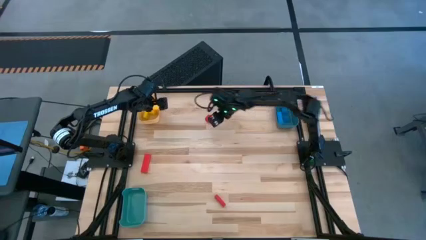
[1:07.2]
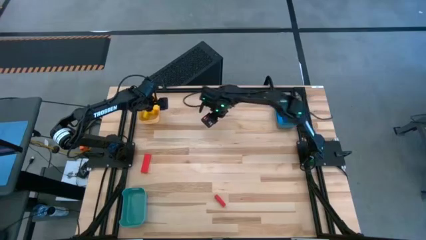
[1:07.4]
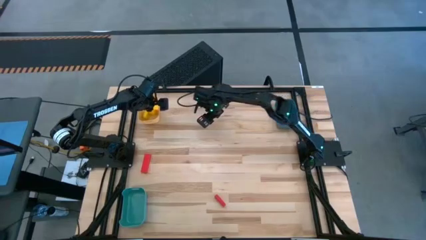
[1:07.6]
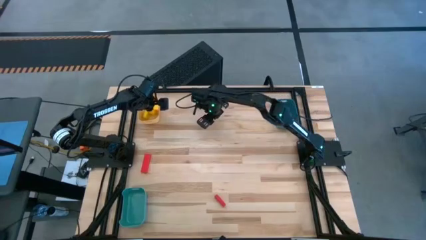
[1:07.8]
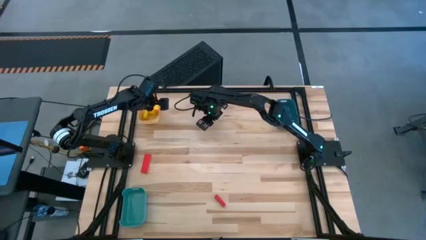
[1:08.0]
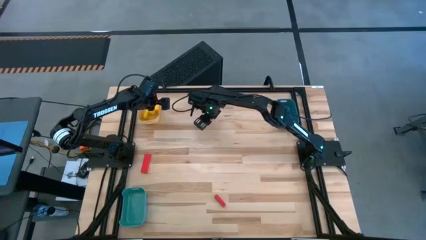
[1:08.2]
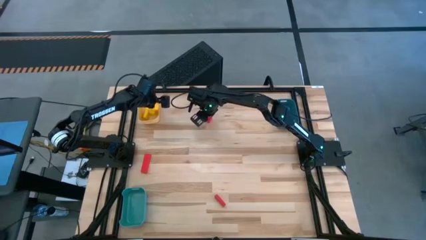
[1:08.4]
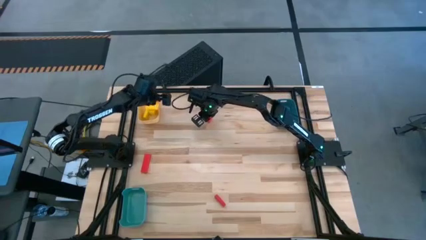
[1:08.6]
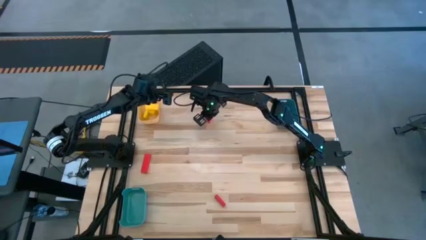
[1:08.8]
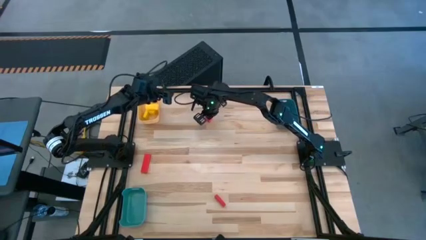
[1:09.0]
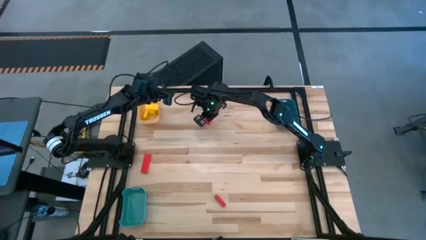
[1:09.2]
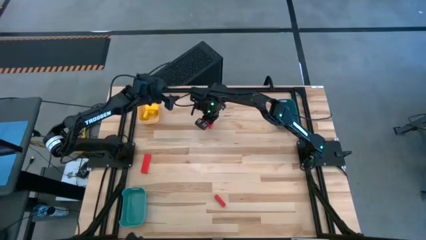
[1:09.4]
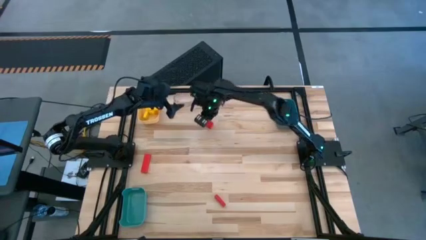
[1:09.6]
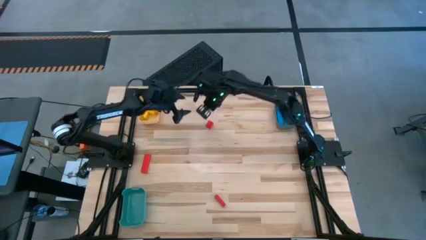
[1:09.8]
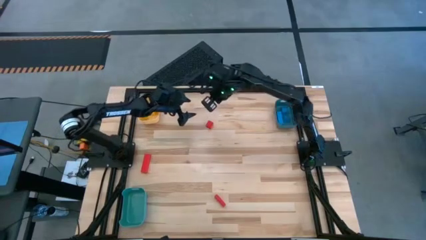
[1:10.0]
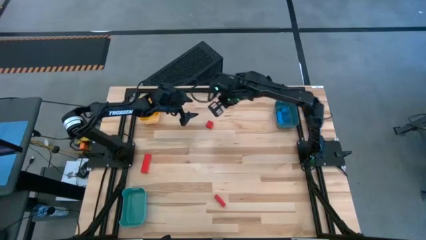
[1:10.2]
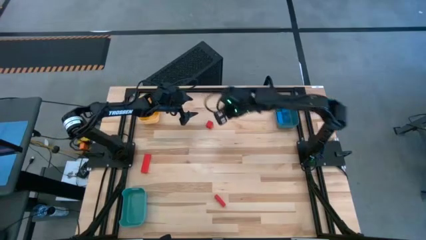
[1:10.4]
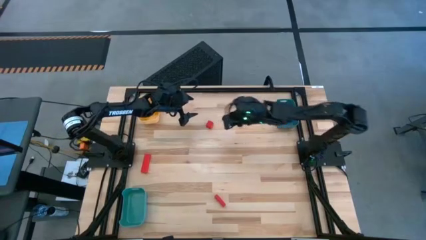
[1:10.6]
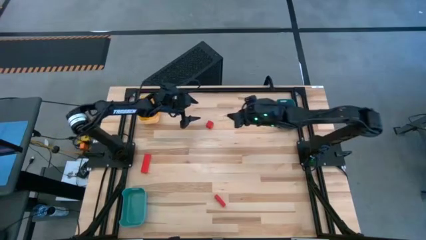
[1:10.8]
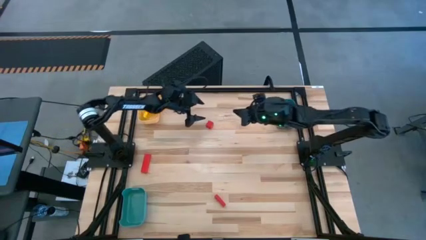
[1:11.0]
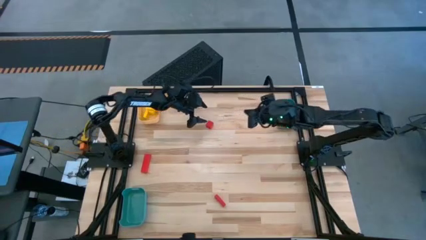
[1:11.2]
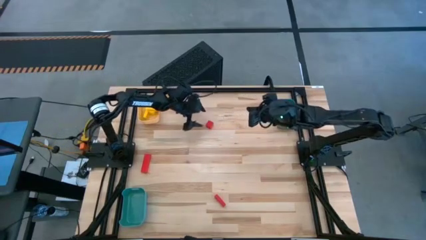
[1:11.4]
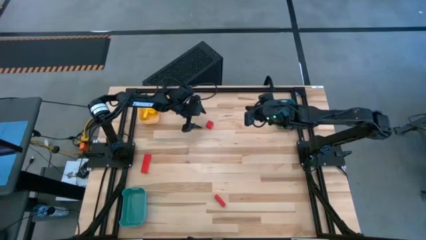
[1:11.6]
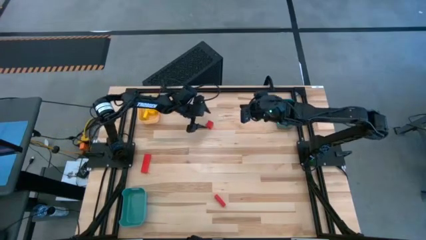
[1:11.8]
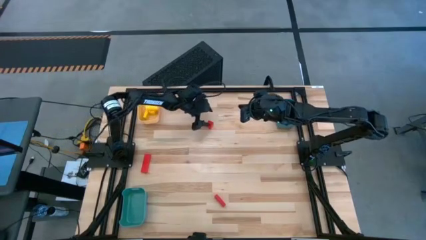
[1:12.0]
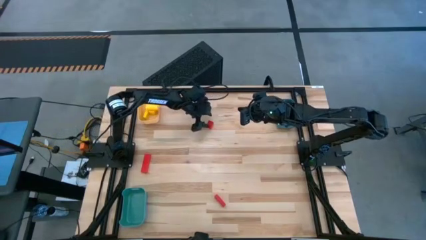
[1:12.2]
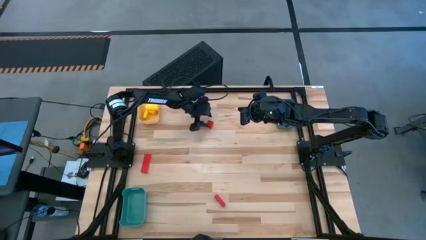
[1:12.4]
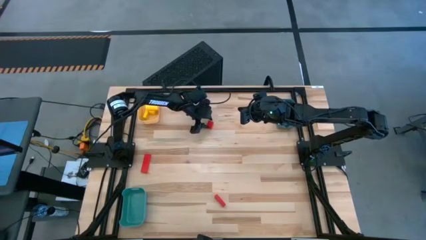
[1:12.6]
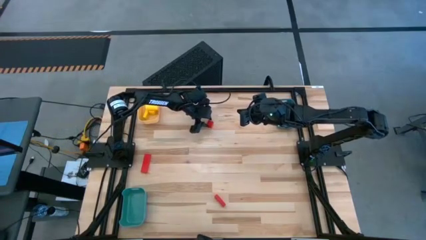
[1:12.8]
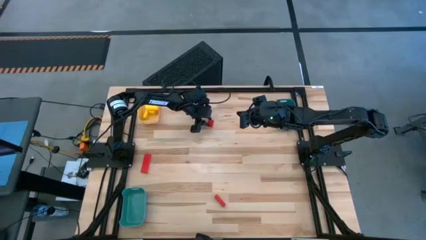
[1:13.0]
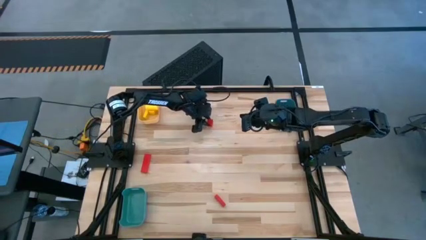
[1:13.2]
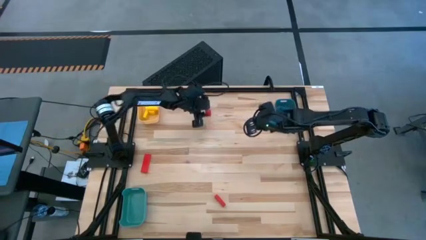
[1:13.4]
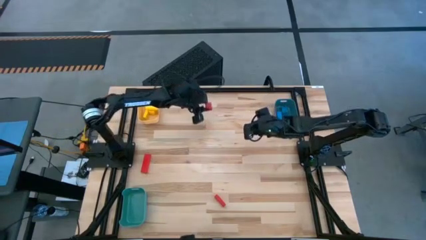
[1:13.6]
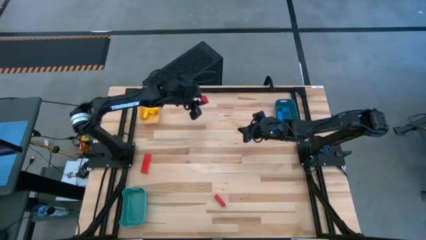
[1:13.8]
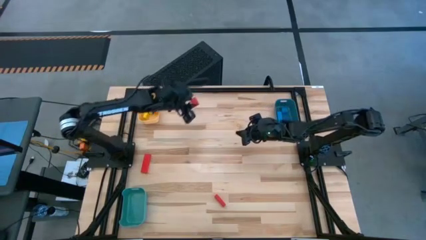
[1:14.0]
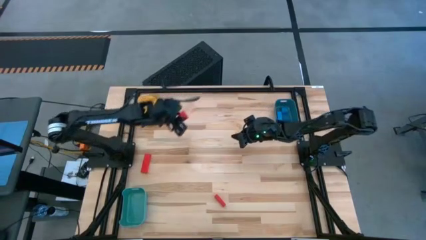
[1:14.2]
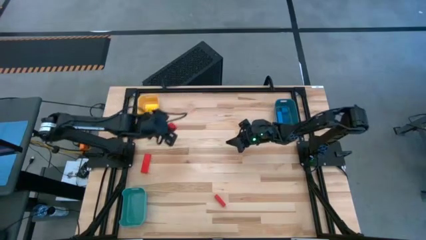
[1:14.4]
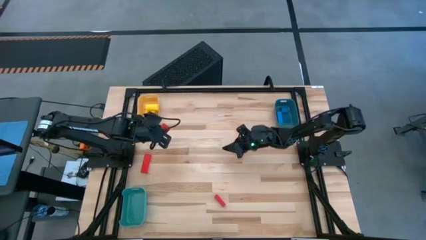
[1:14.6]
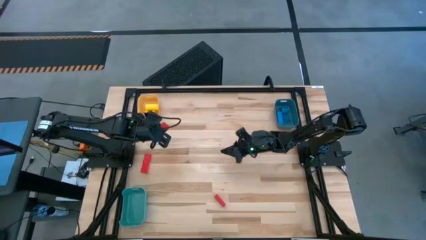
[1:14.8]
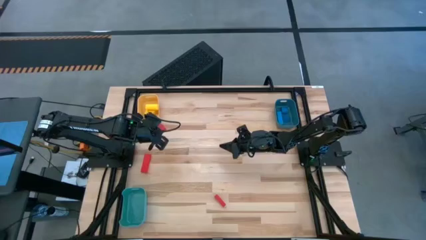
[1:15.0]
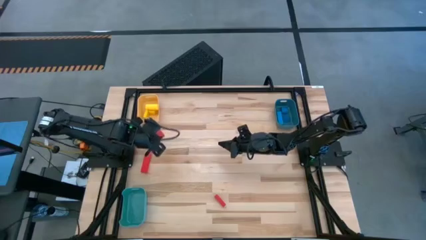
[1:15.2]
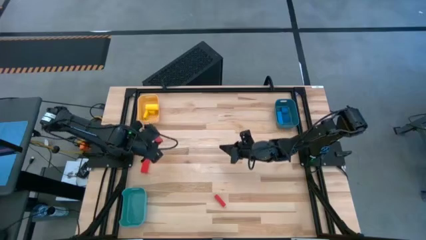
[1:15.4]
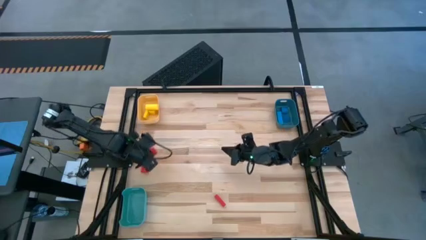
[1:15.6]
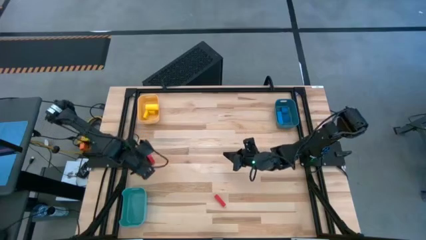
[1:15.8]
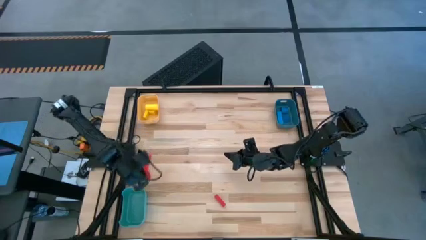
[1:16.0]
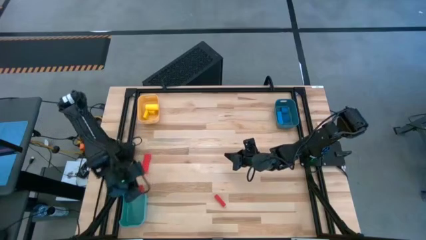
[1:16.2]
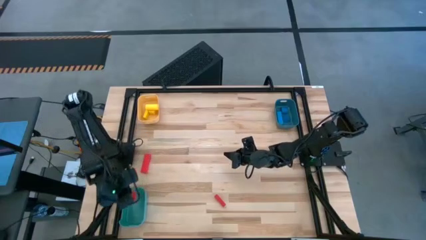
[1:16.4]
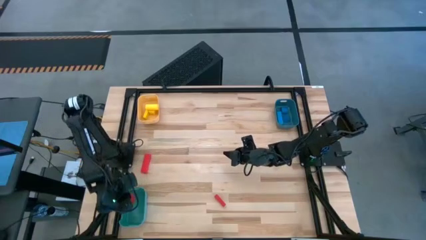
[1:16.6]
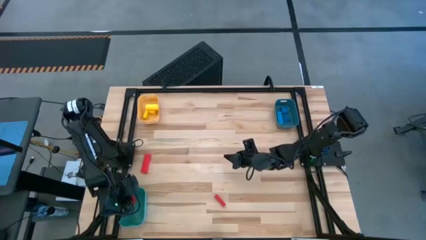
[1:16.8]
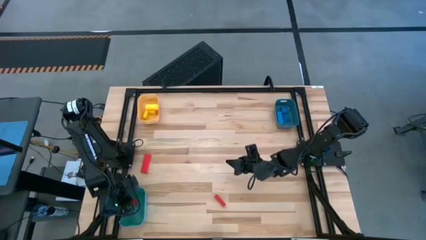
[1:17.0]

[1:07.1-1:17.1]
Task: Sort & place blocks by color
Put the top red block into the green bin

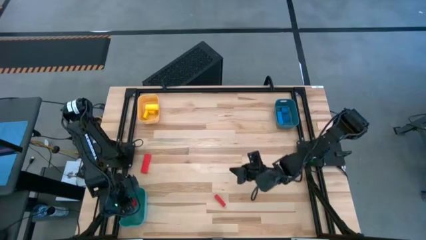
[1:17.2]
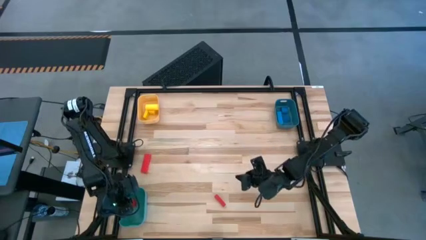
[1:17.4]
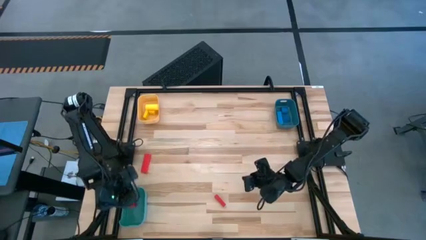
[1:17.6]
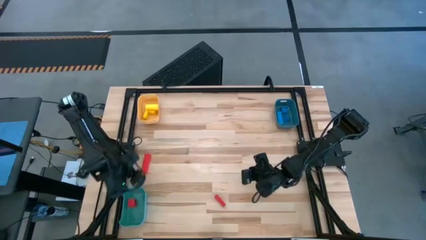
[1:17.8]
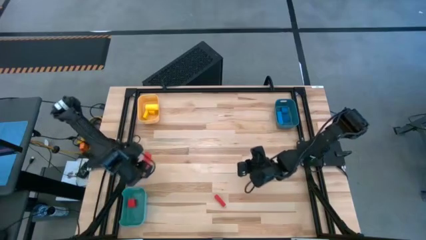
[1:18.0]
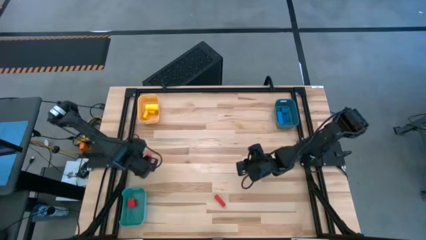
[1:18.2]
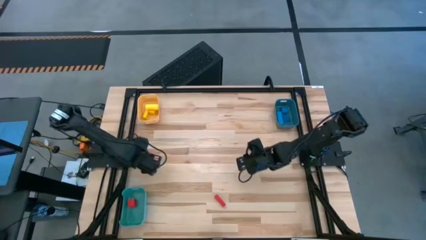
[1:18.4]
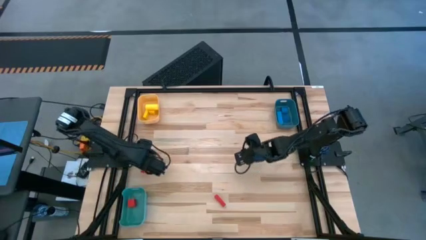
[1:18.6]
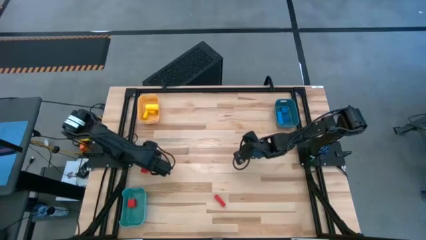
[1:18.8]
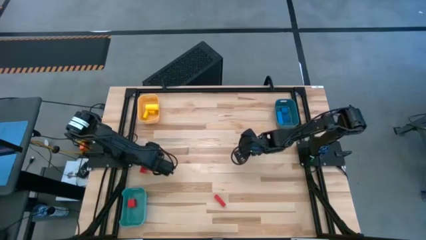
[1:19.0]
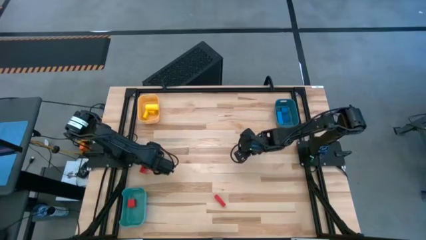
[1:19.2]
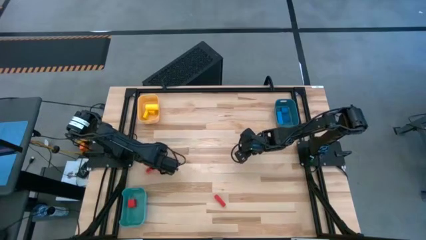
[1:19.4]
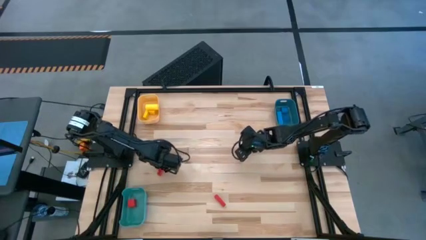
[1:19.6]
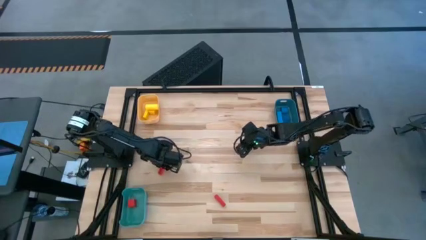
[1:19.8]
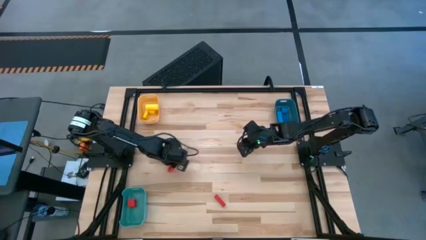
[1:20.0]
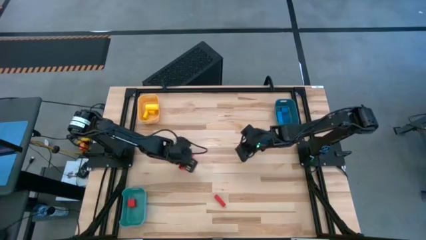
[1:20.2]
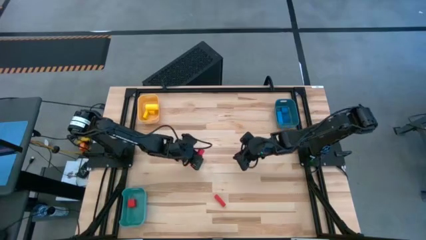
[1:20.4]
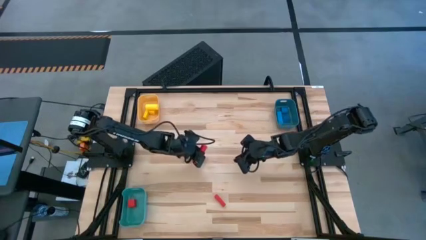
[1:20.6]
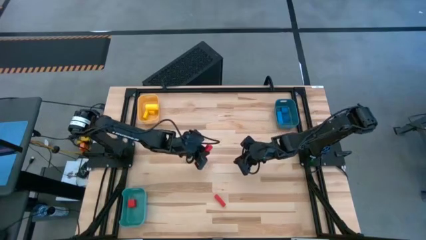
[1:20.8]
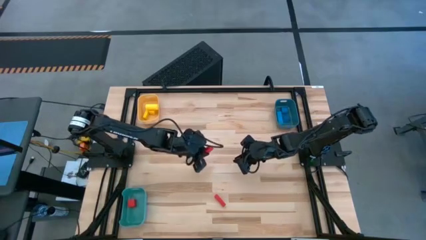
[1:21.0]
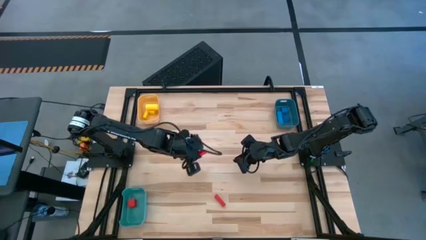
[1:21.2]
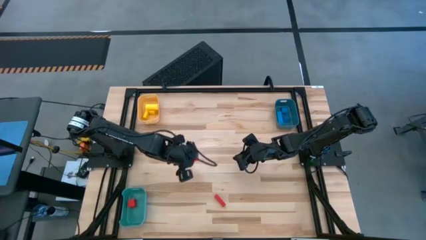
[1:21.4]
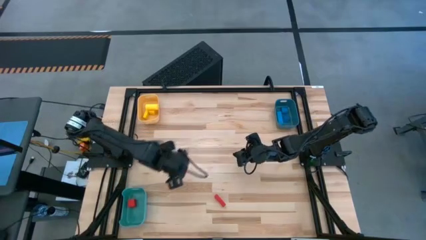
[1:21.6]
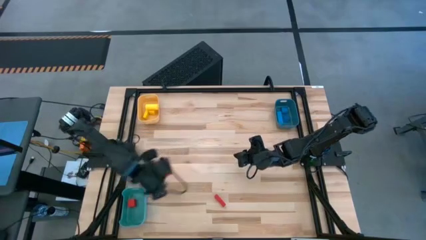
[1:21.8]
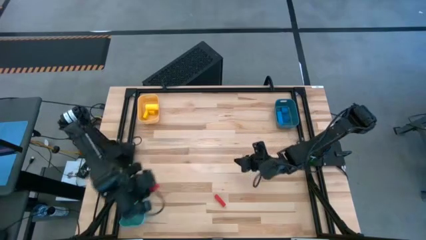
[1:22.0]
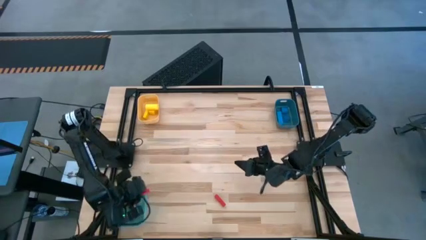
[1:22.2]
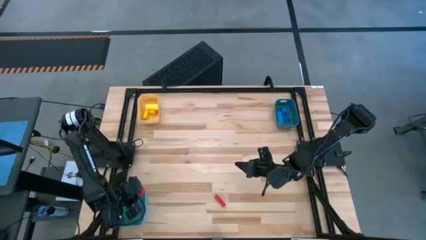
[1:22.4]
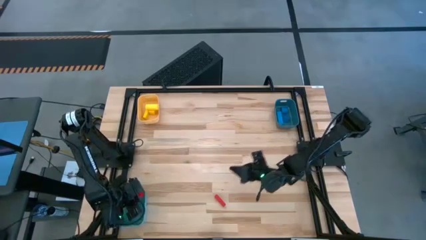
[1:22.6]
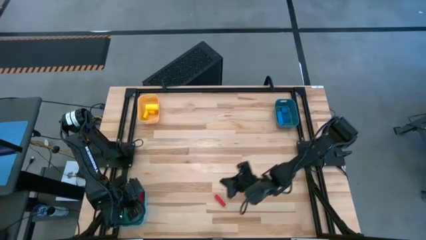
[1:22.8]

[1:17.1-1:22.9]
Put the left red block into the green bin

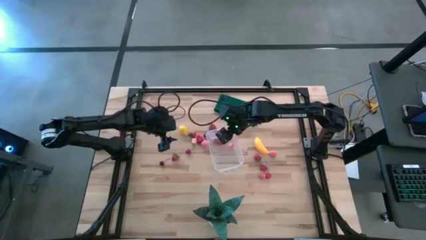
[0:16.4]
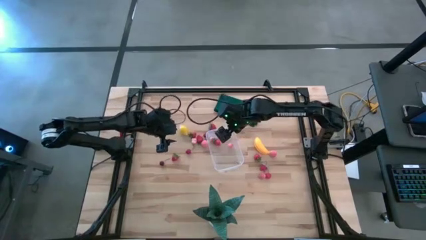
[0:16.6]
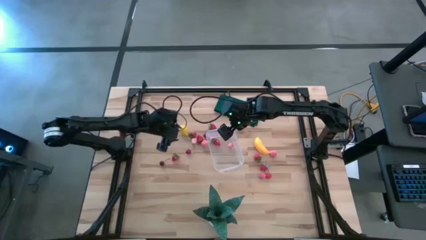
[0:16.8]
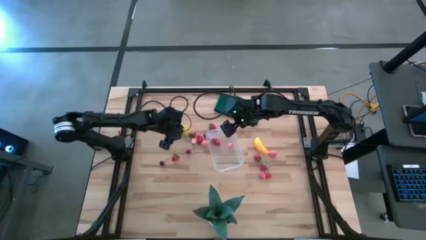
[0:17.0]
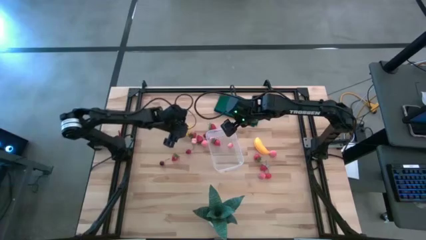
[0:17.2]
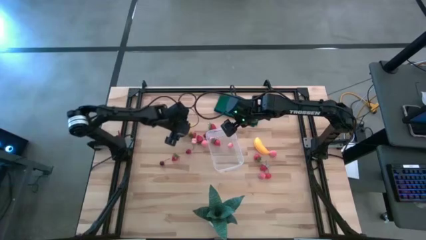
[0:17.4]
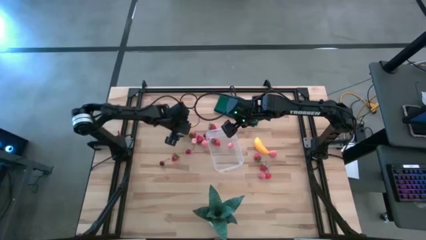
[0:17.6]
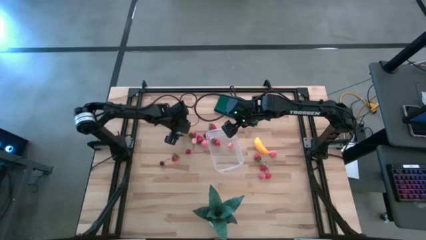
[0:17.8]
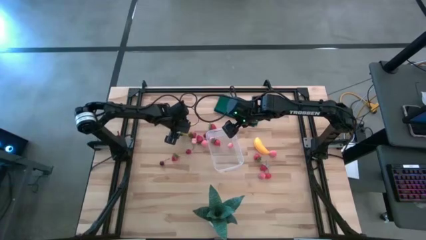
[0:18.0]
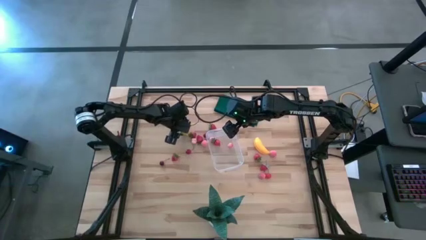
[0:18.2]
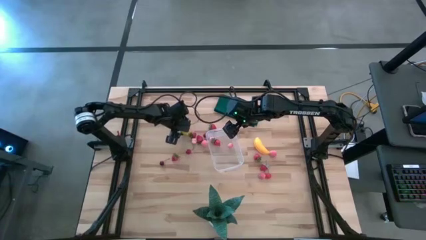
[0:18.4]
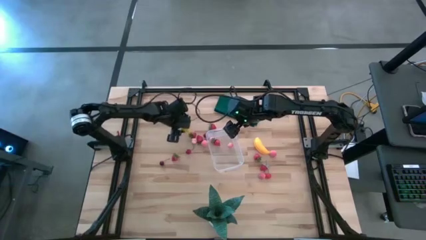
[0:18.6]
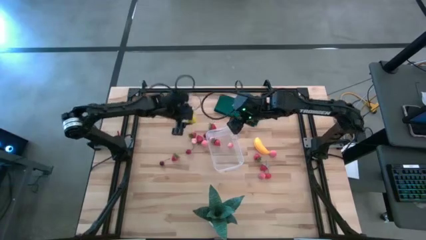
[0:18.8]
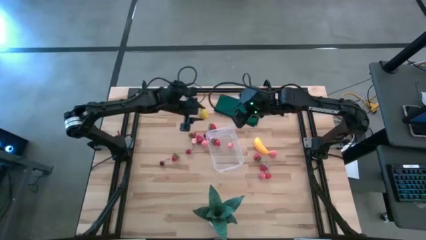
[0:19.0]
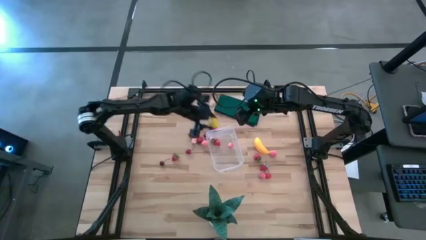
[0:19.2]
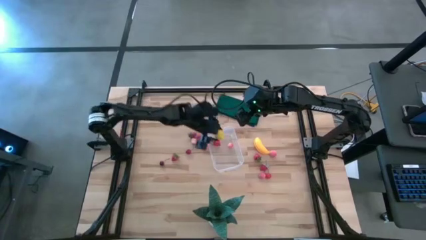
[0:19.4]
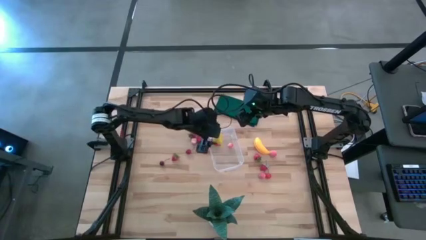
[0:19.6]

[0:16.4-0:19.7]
Task: Pick and placing Produce into tupperware
Put the lemon into the transparent bin
